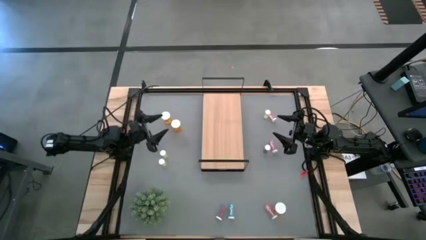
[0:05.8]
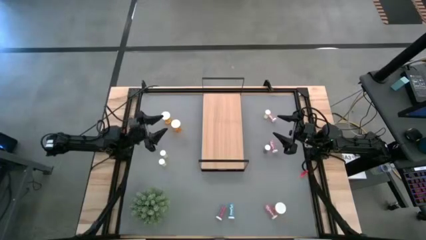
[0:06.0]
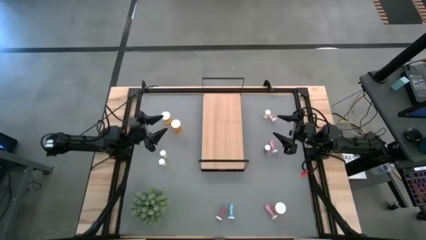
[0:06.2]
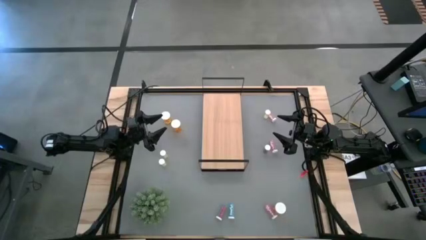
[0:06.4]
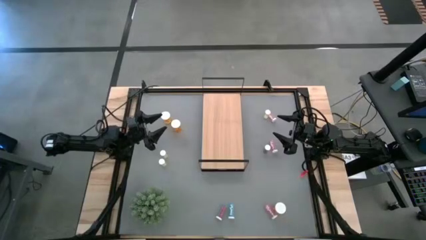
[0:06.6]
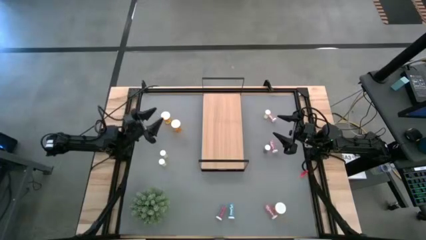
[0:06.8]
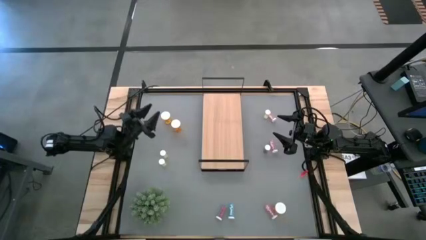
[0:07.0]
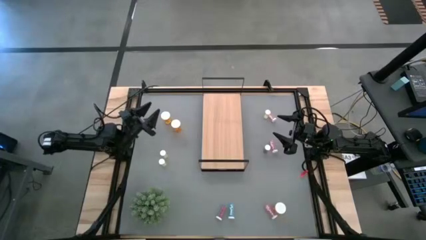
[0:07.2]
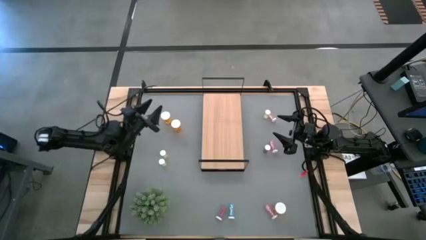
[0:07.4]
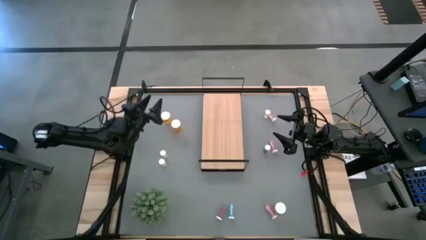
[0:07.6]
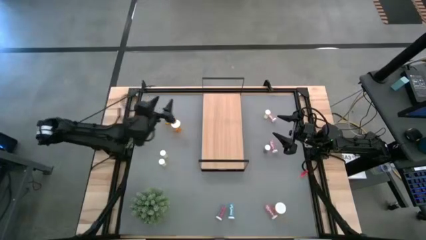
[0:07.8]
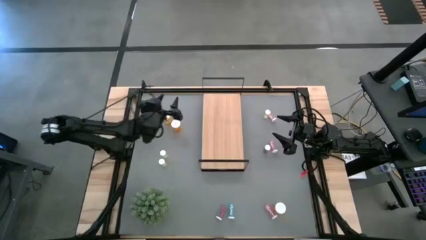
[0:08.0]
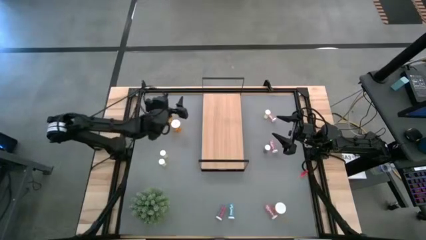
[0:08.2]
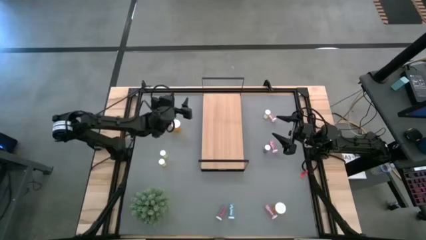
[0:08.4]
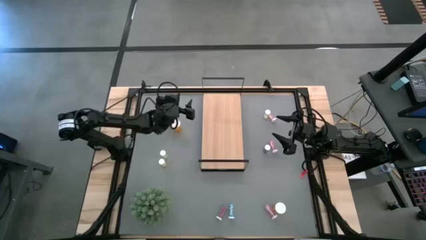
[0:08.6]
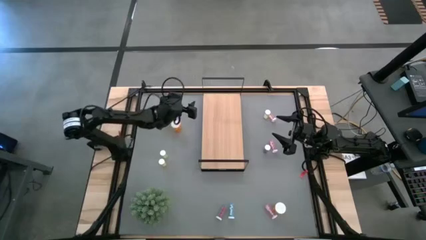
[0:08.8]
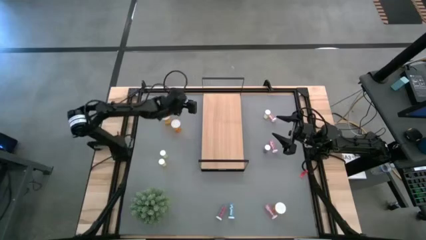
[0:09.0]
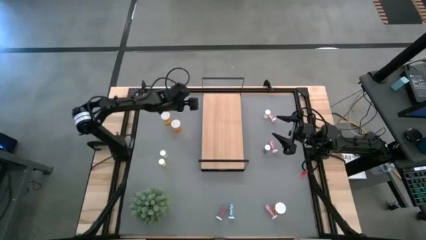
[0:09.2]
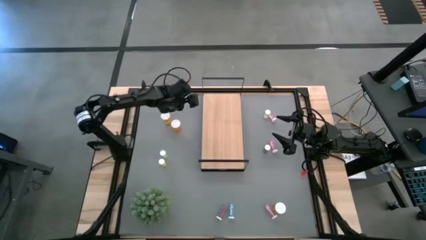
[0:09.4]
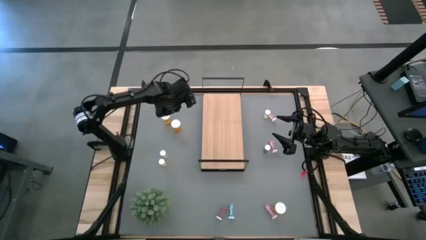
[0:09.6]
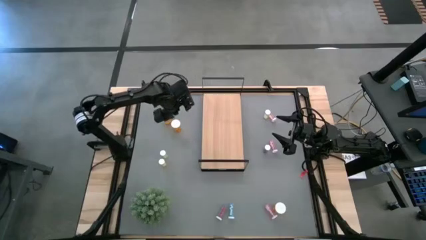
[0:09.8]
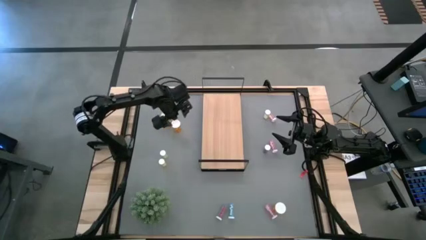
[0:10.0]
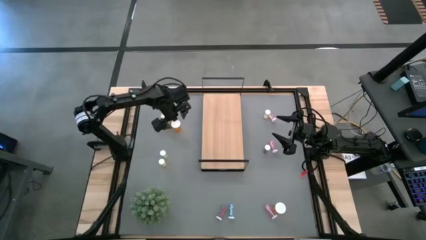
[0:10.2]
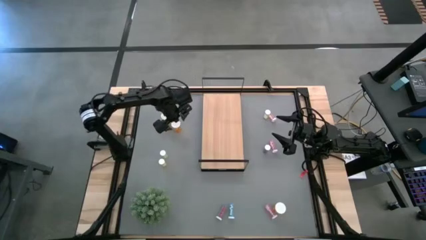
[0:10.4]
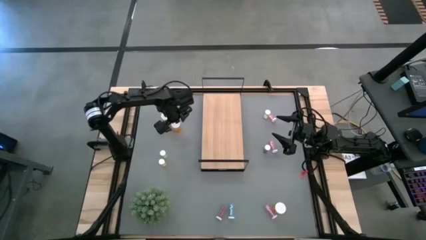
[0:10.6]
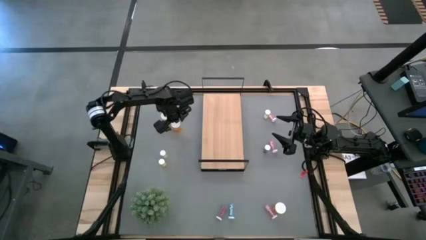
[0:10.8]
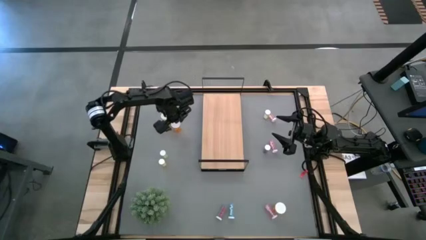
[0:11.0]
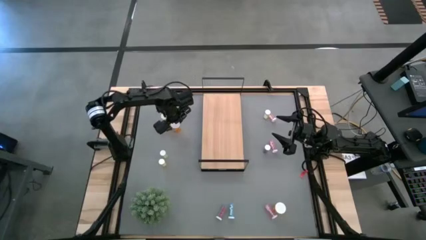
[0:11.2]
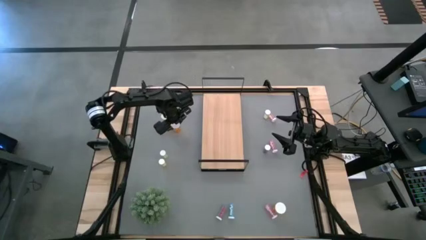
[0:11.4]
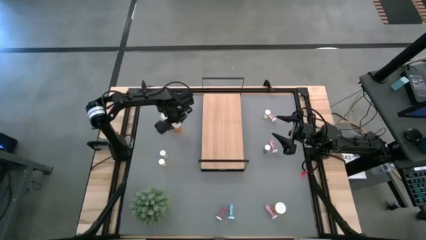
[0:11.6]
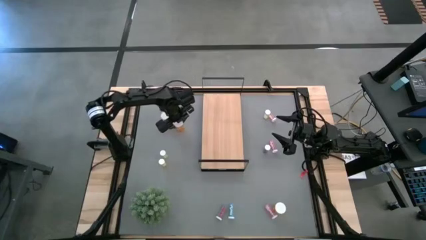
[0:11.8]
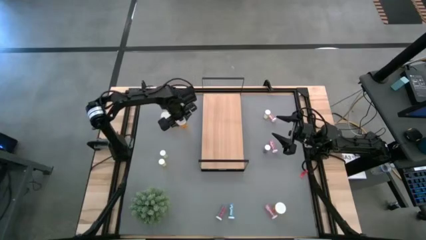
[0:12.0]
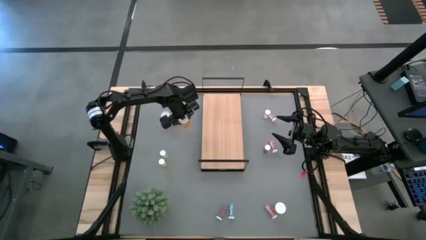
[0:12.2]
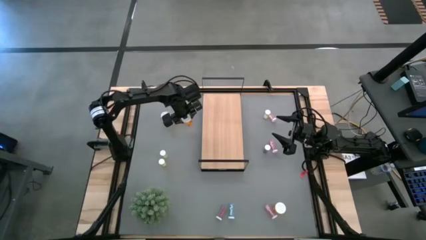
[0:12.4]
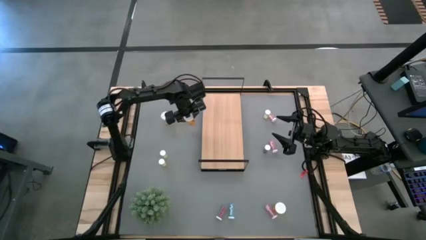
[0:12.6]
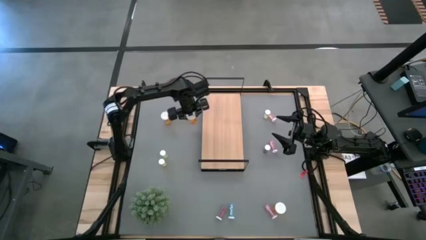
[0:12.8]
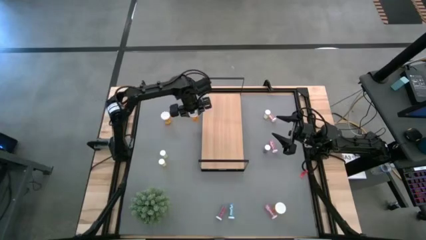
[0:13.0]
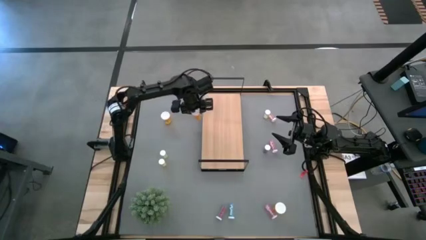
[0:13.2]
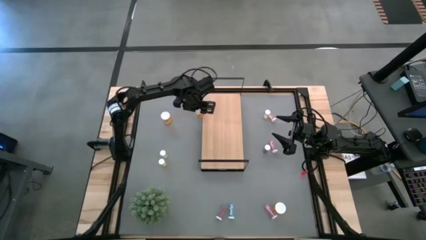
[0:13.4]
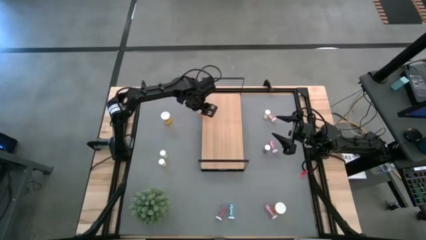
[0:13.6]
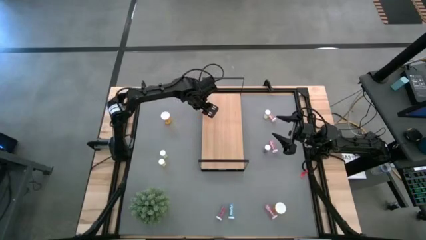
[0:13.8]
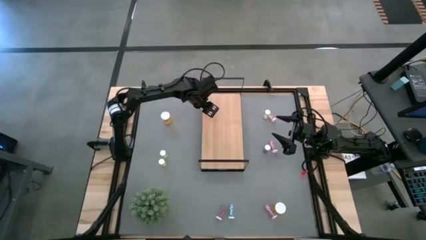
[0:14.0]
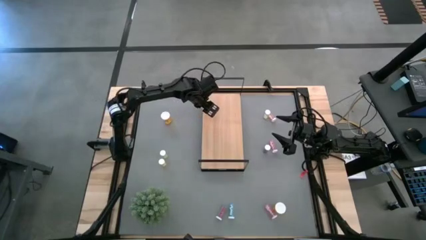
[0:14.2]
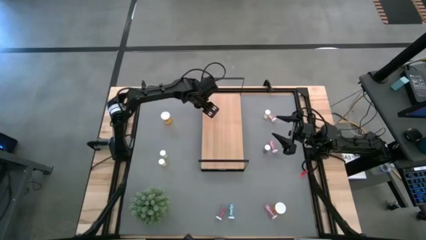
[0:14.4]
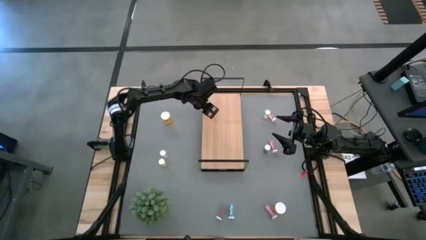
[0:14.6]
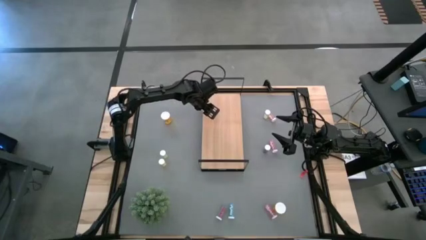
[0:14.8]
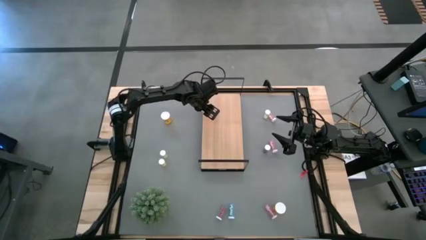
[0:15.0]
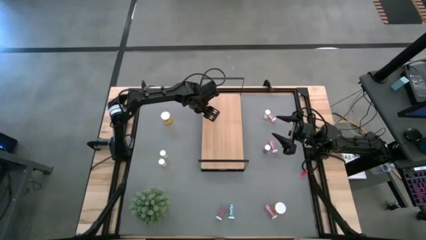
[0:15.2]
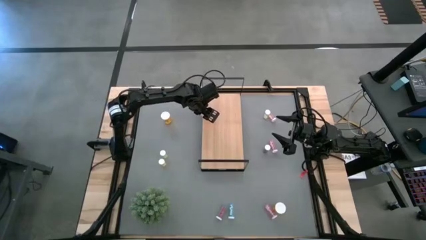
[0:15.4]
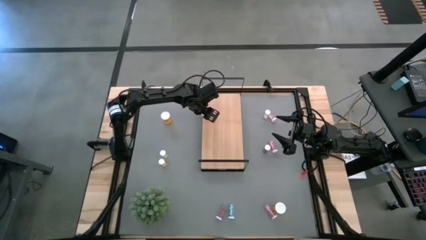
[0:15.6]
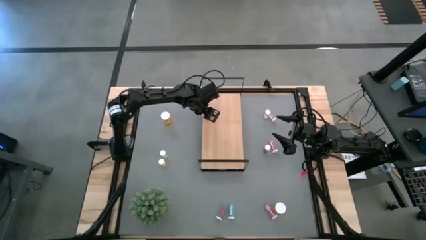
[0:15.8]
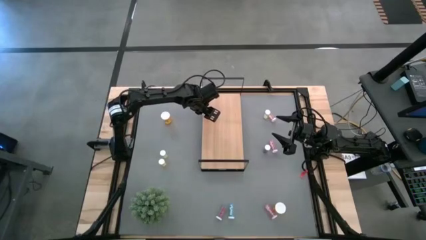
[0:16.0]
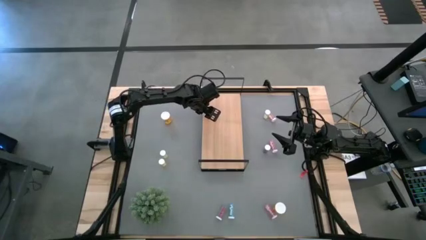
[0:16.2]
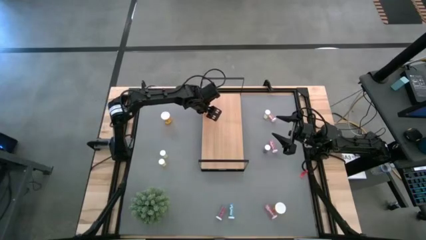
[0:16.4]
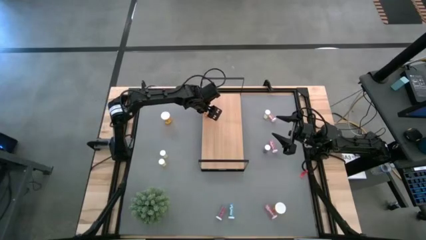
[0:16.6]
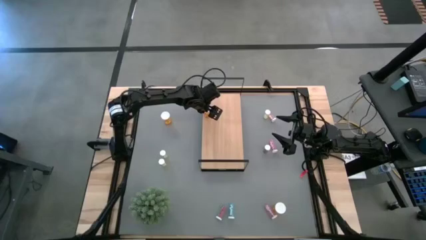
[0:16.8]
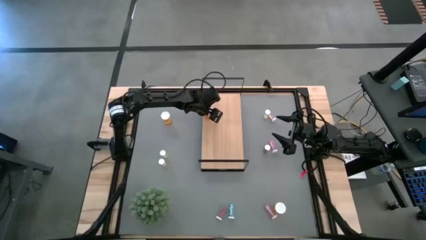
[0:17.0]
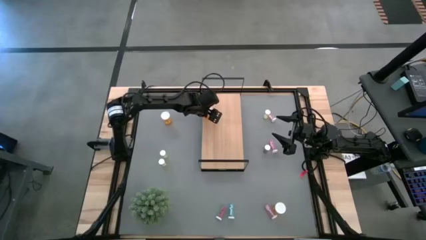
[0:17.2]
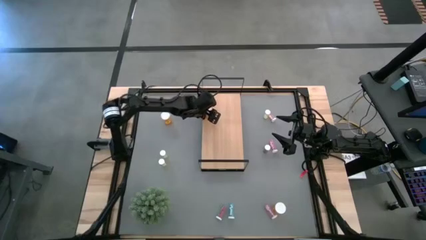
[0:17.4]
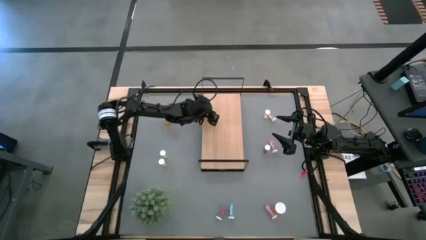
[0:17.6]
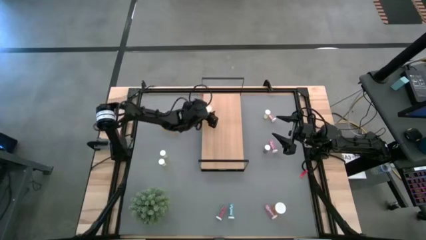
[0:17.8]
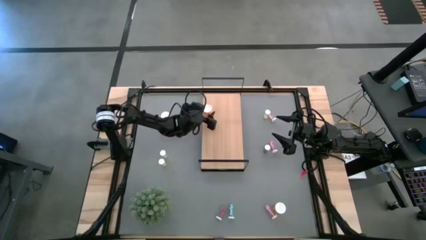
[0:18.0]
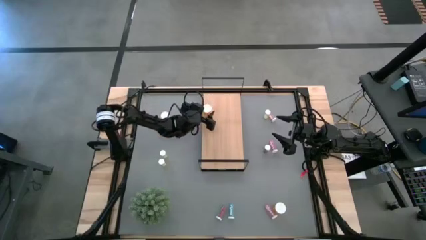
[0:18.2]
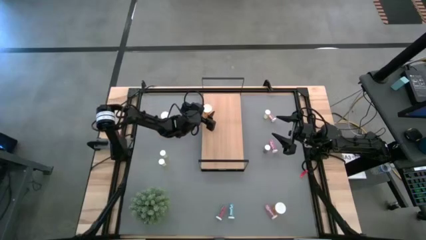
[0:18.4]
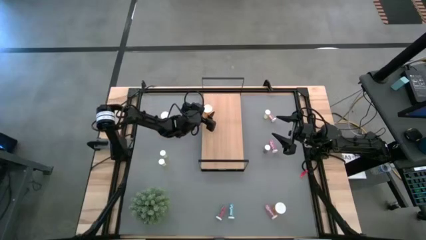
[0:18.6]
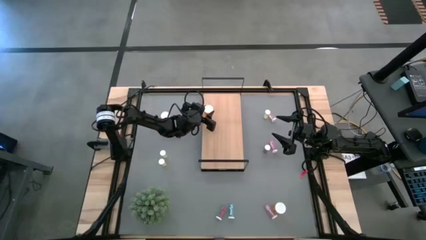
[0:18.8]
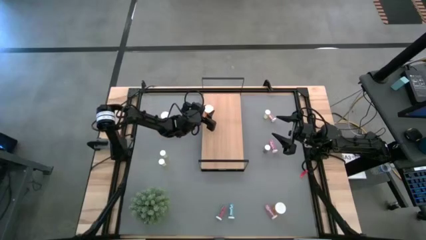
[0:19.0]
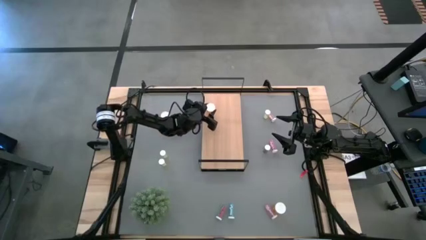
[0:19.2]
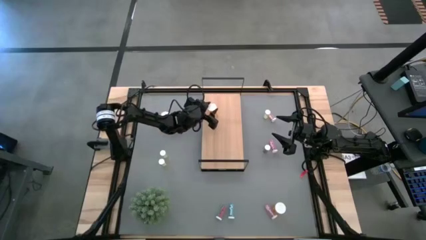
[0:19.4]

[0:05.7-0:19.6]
Task: Pick and place medicine bottles onto shelf by color
Put the top right orange pill bottle on the shelf
